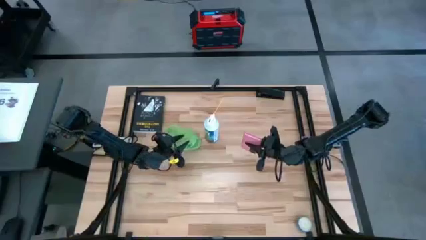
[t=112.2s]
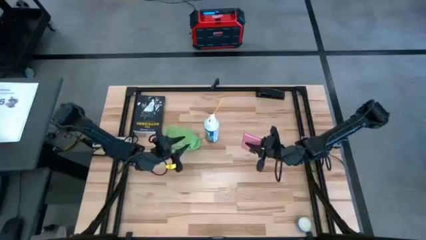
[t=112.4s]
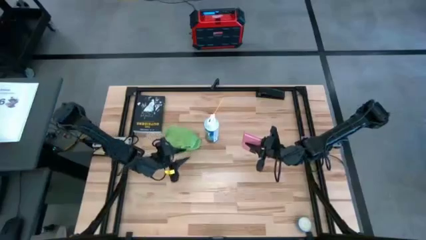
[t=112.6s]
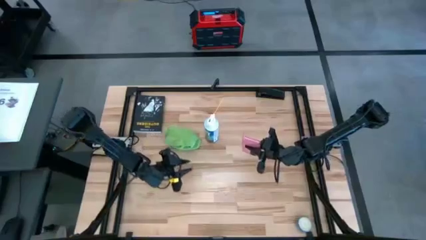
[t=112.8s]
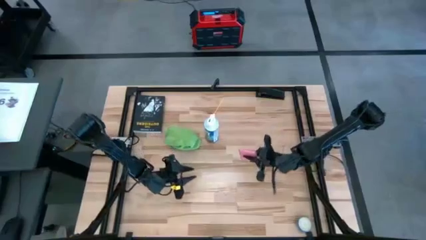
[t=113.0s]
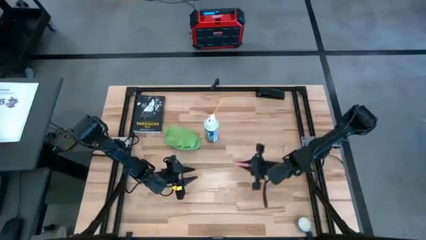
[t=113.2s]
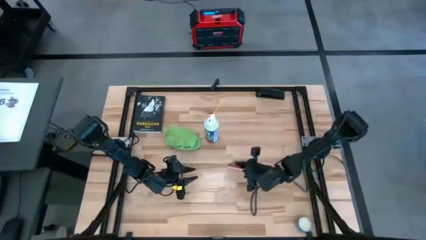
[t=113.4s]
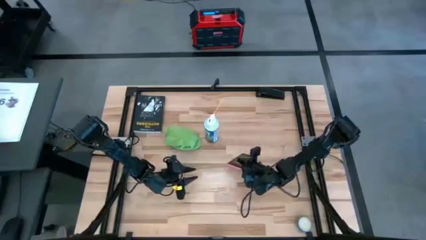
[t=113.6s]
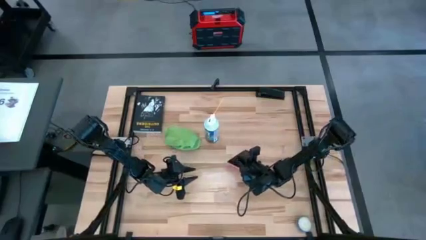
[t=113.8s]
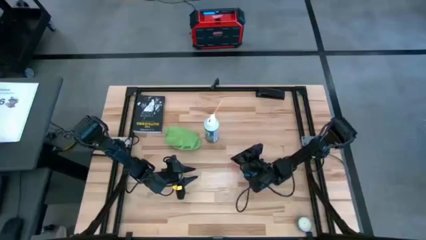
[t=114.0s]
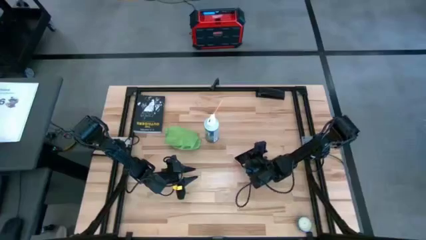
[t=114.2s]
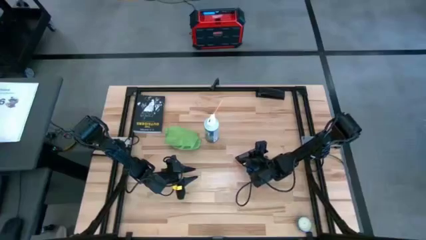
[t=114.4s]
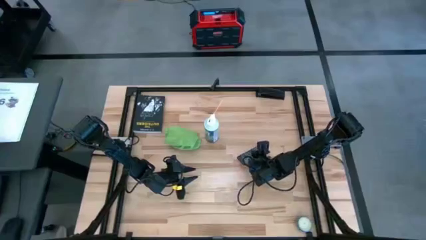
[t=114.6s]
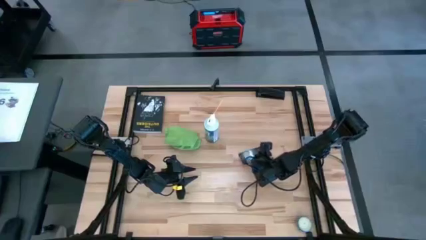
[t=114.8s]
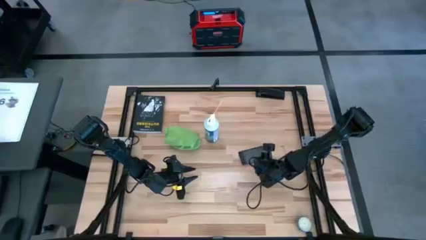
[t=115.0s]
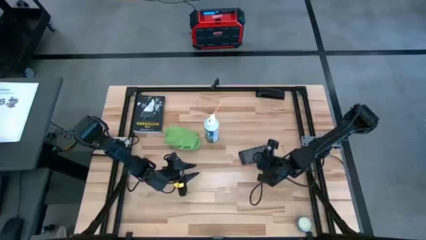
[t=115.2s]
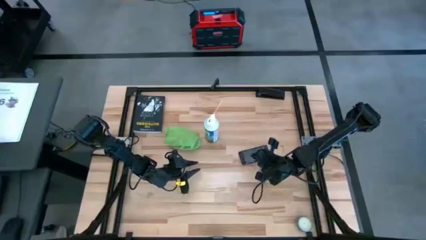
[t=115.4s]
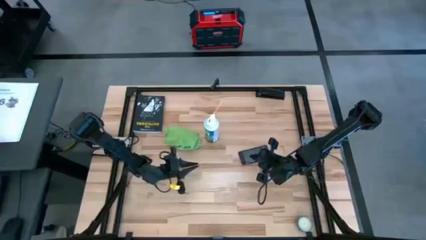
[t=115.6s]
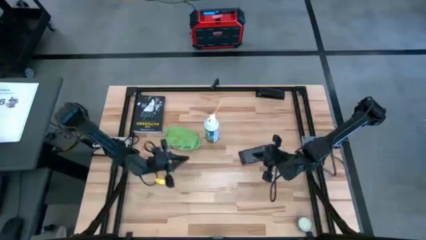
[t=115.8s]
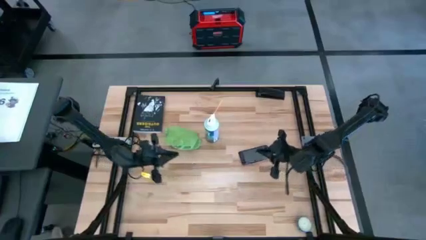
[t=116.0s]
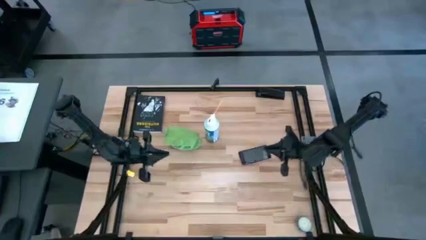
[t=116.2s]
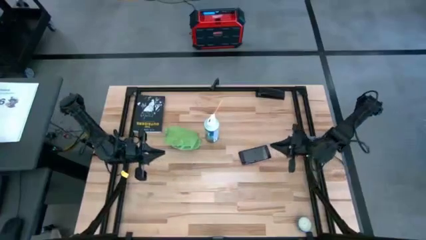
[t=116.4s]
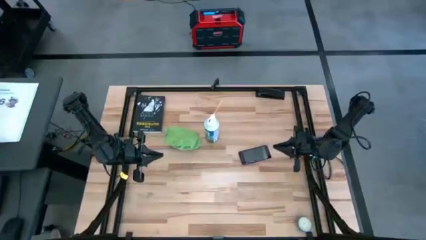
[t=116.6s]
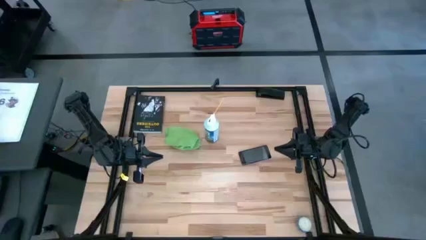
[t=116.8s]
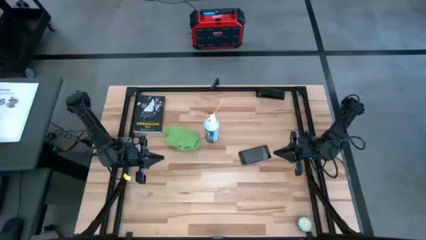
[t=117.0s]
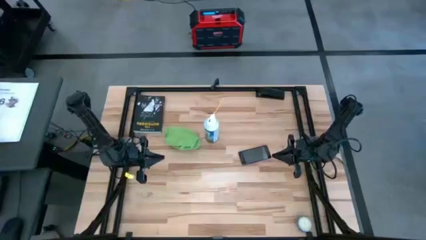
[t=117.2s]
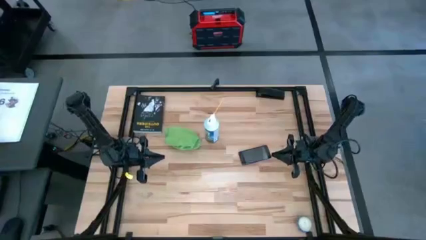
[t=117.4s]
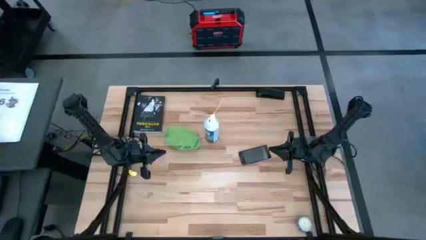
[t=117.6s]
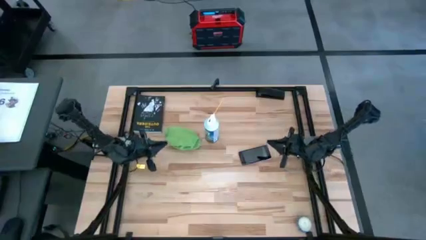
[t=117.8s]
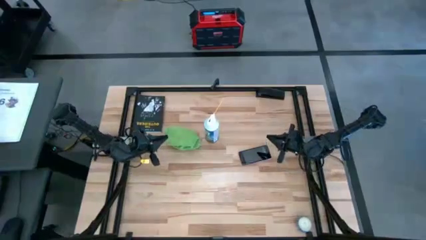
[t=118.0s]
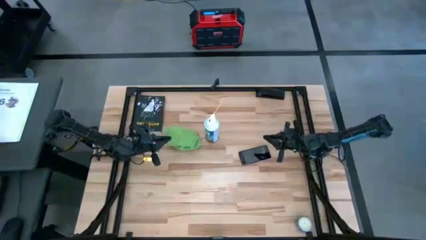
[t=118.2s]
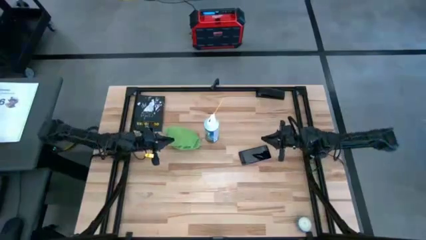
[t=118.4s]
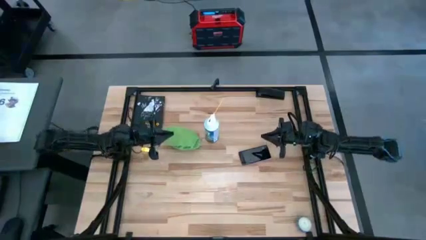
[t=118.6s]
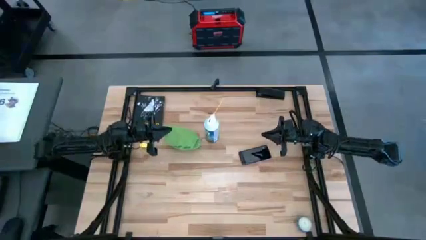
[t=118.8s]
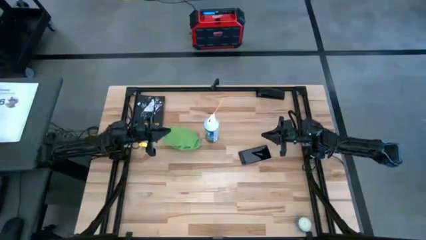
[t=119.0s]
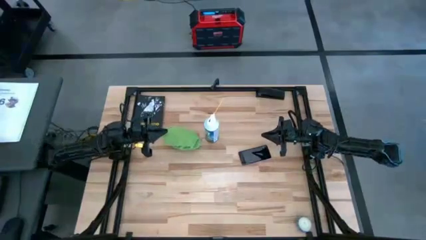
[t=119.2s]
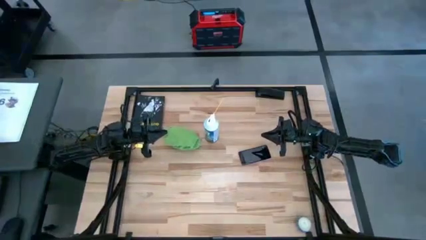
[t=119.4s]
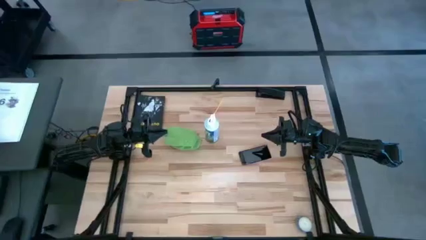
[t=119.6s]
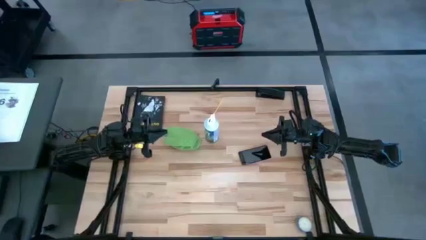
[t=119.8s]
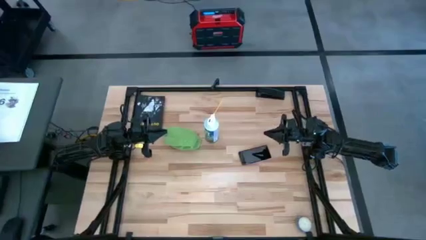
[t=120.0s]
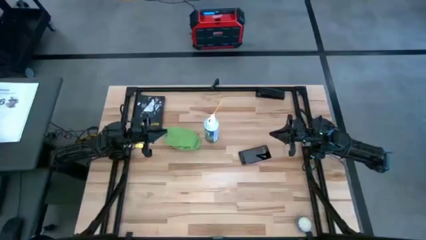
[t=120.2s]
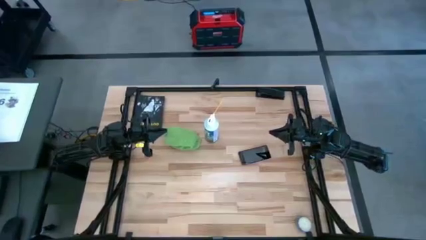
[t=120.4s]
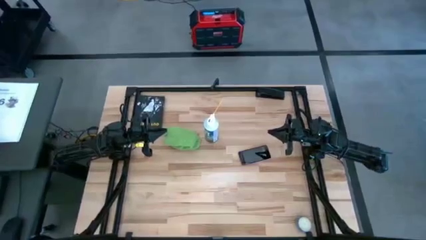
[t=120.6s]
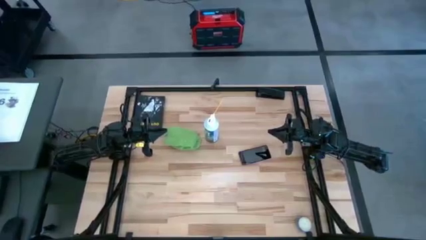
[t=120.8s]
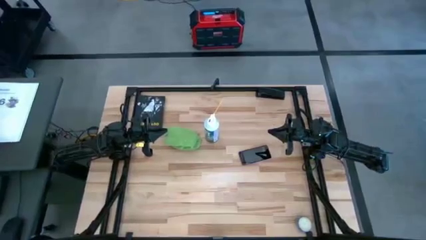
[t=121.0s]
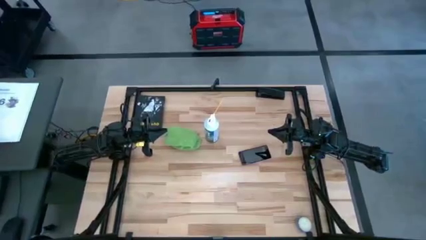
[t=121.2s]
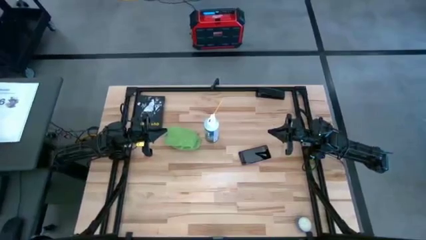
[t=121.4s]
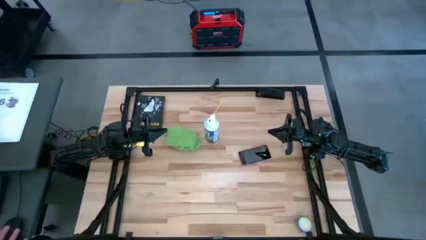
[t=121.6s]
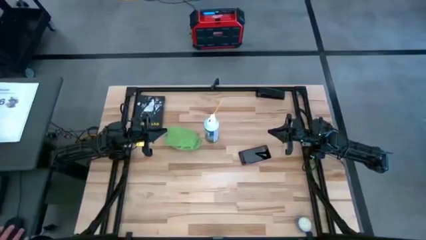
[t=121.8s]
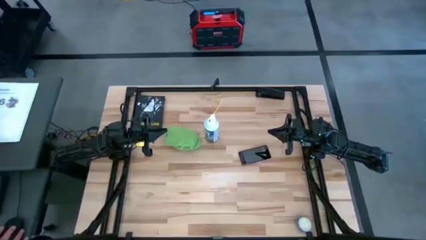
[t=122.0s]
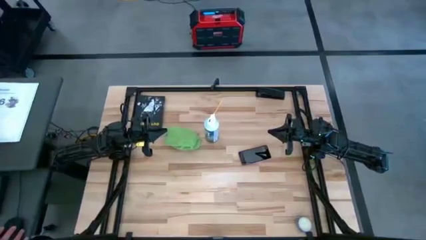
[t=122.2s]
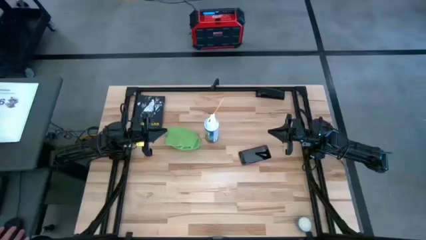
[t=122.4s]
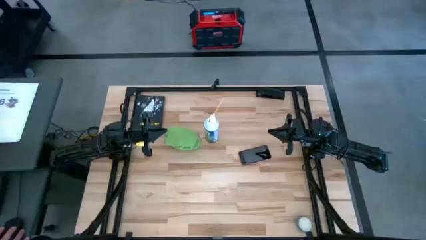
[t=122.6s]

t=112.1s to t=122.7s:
Task: Apply microfiber cloth
Return to Home Position

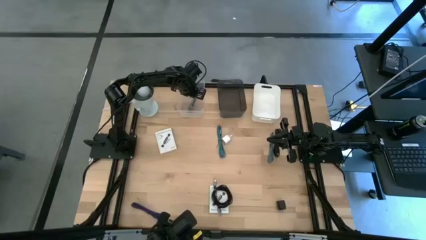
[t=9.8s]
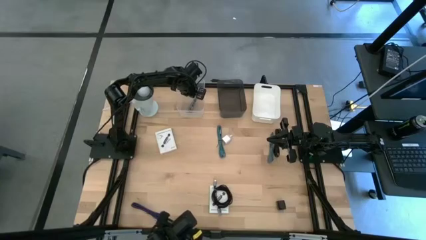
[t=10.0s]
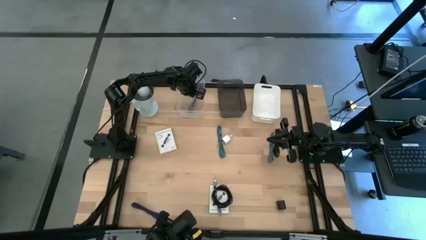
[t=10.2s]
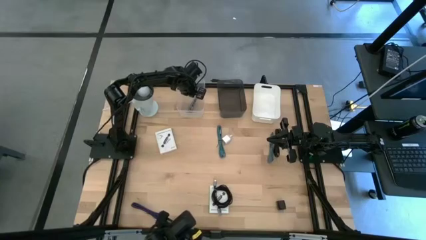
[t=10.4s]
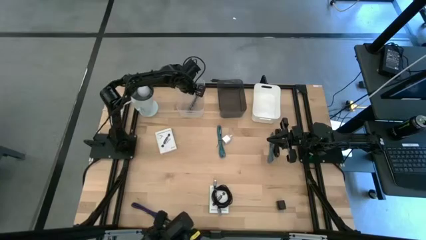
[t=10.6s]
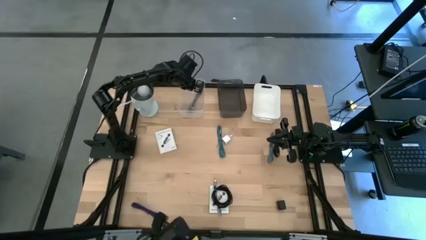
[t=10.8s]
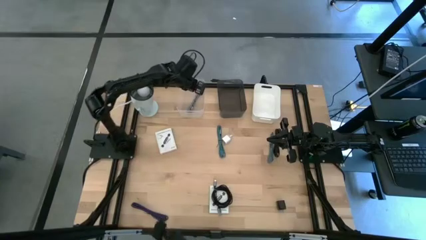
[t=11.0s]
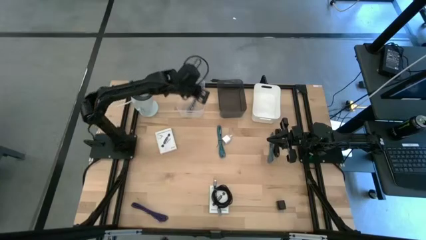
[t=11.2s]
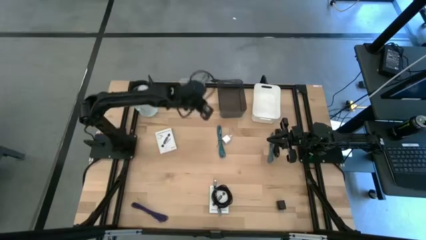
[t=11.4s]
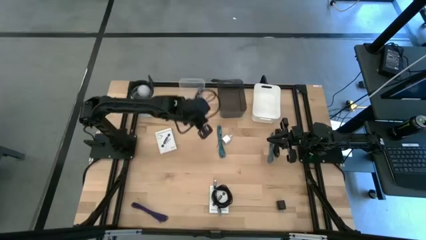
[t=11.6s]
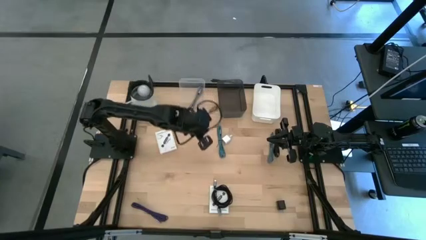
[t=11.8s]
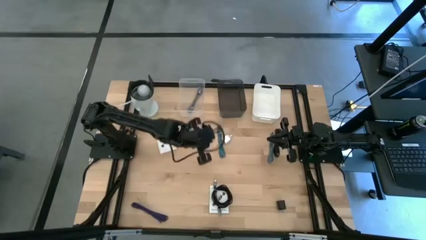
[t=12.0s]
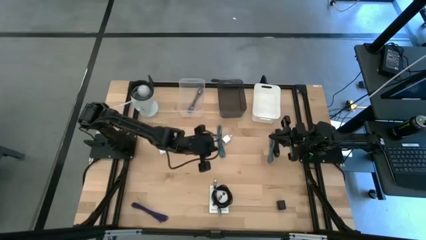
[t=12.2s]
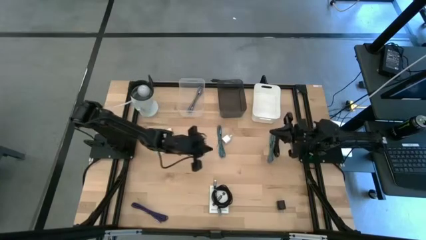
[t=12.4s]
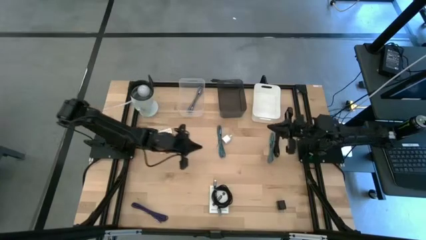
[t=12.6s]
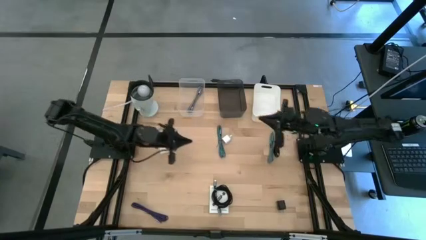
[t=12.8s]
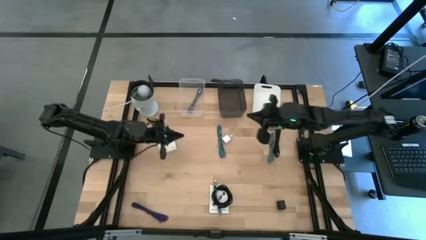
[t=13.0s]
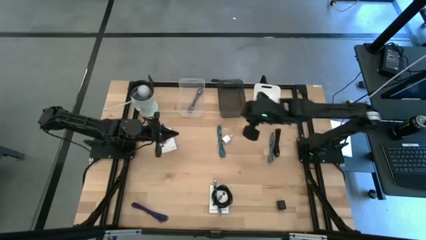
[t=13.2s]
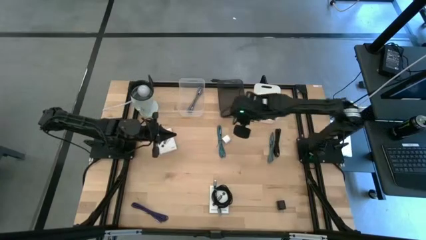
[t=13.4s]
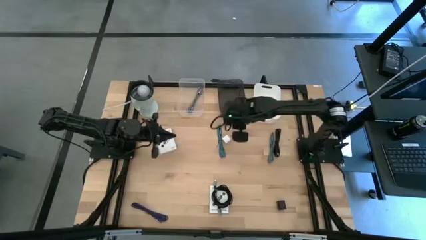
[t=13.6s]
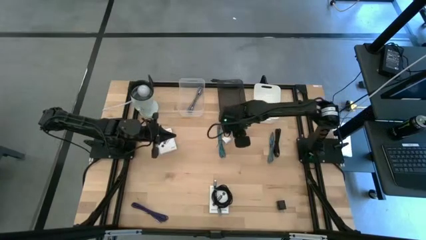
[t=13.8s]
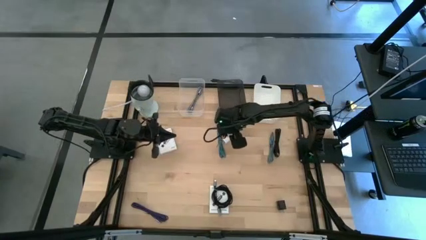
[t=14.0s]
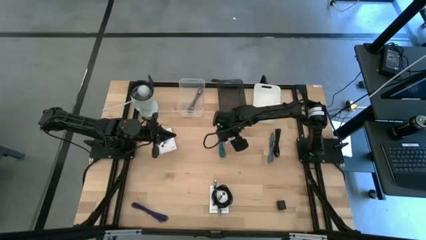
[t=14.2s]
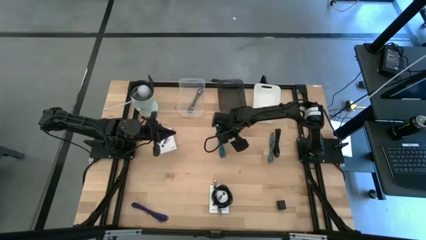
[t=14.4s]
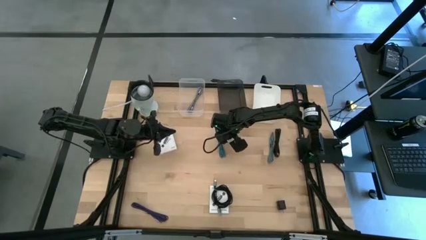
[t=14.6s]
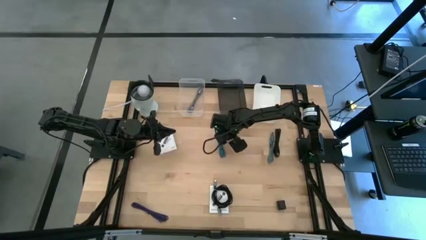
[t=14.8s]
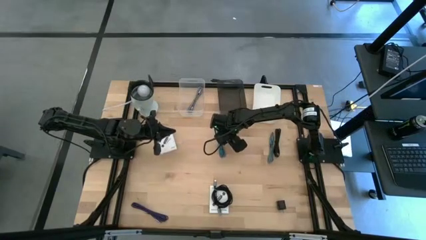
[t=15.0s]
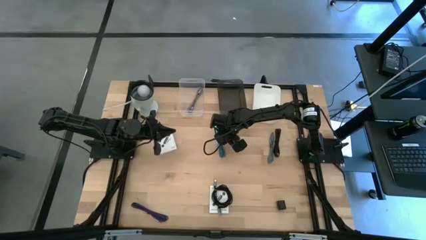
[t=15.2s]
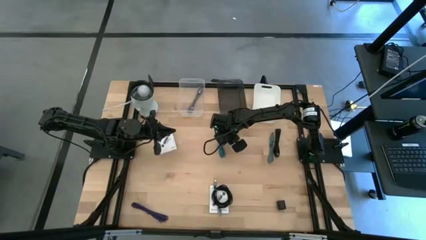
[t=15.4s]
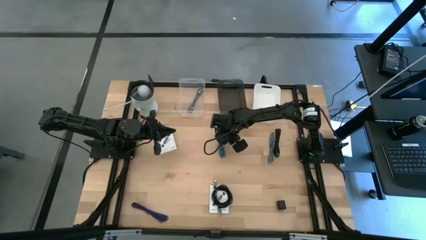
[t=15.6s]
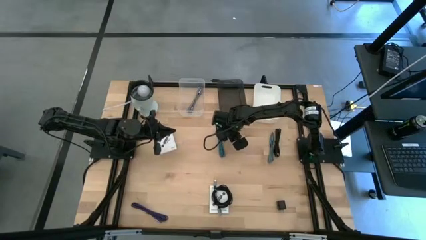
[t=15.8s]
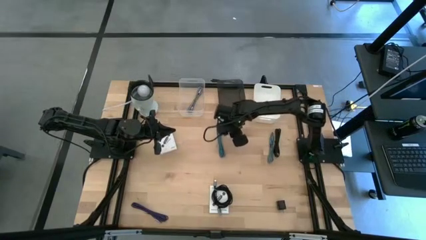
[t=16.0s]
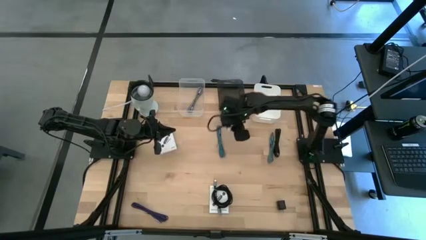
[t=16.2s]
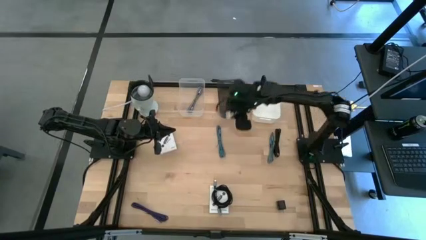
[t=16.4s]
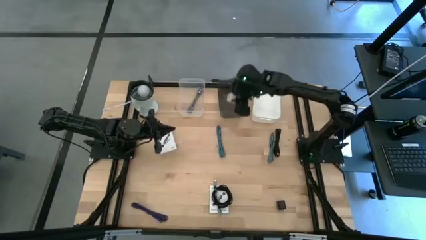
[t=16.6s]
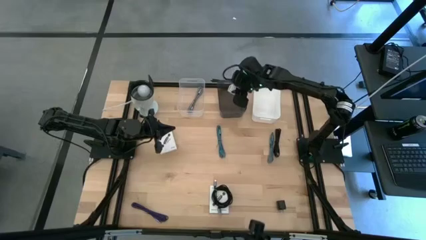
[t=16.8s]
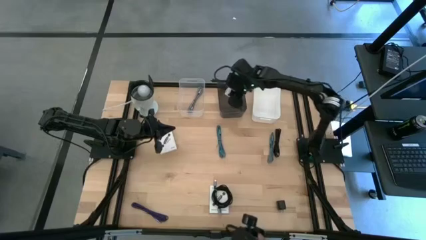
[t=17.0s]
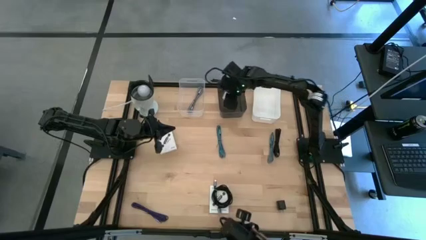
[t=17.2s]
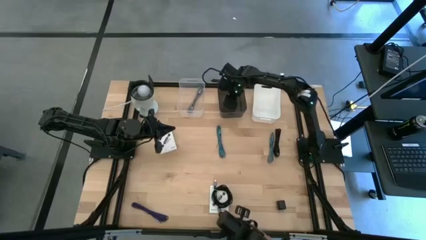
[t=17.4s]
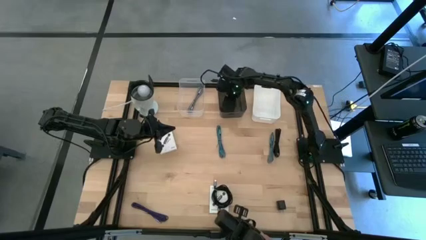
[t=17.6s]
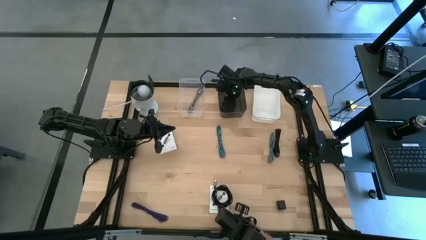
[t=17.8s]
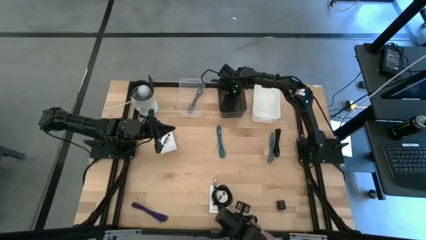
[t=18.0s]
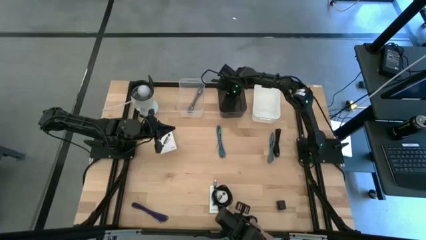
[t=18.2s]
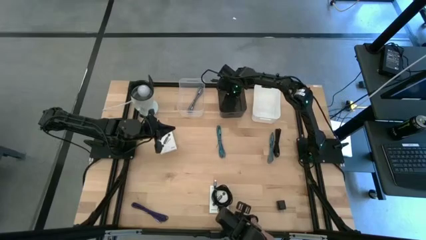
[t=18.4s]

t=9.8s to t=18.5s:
Task: Pick and place items into bin
Put the white charger adapter into the black bin
